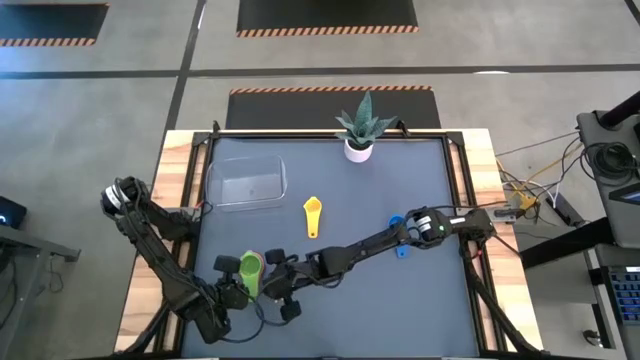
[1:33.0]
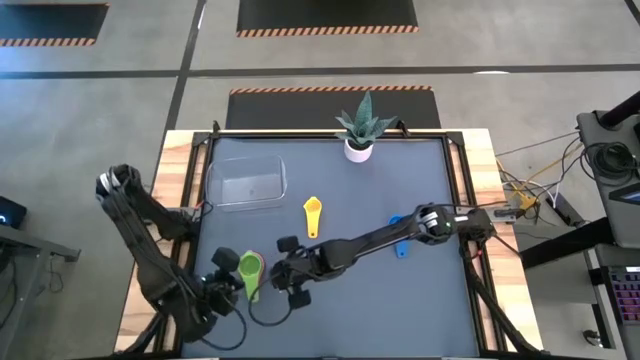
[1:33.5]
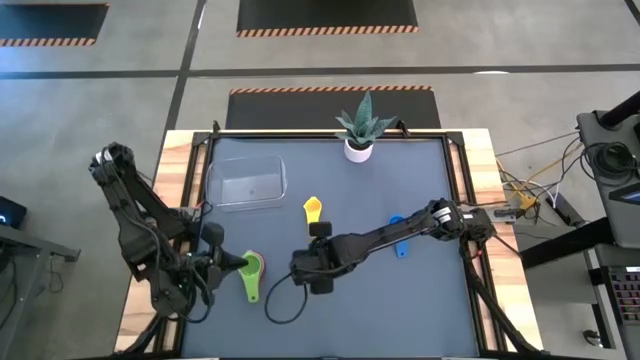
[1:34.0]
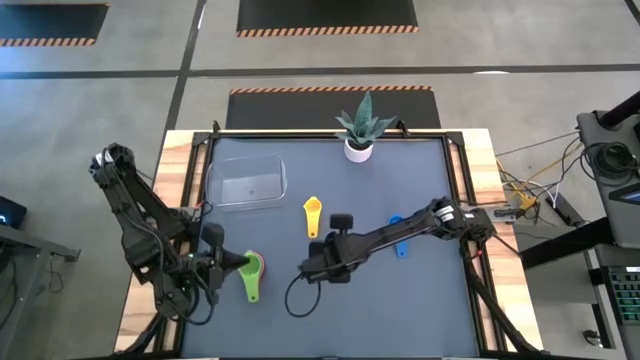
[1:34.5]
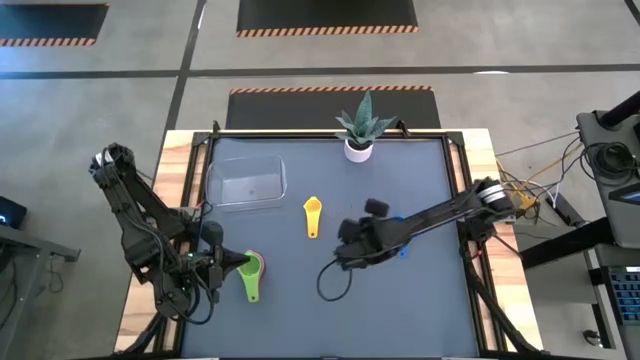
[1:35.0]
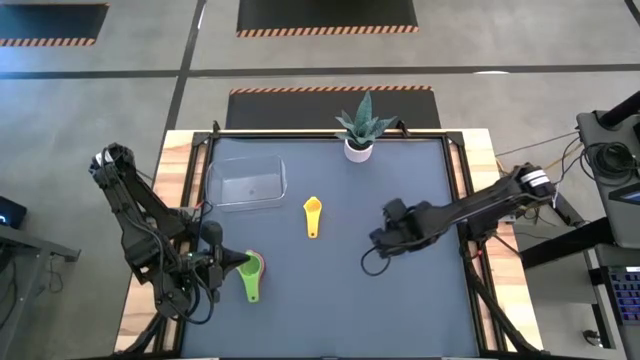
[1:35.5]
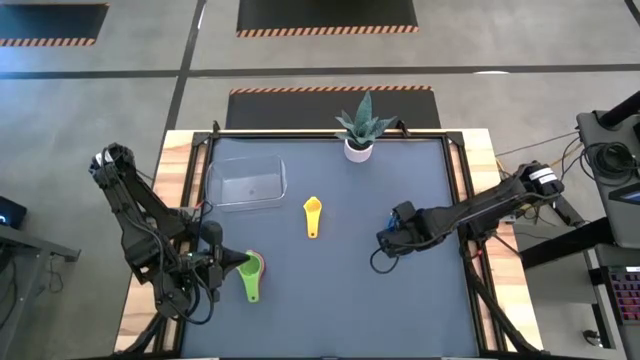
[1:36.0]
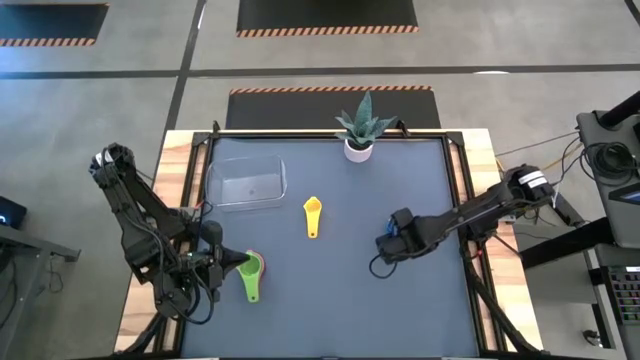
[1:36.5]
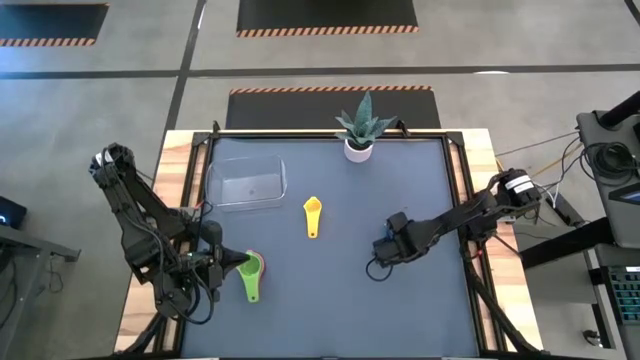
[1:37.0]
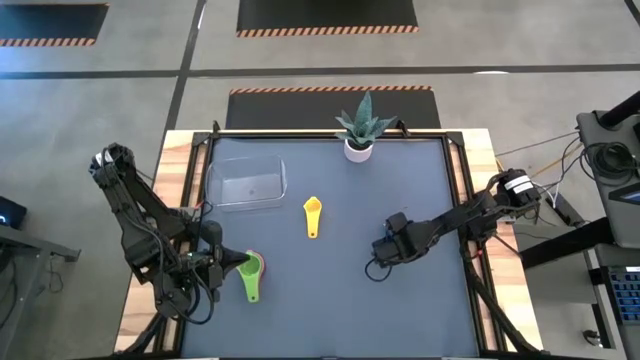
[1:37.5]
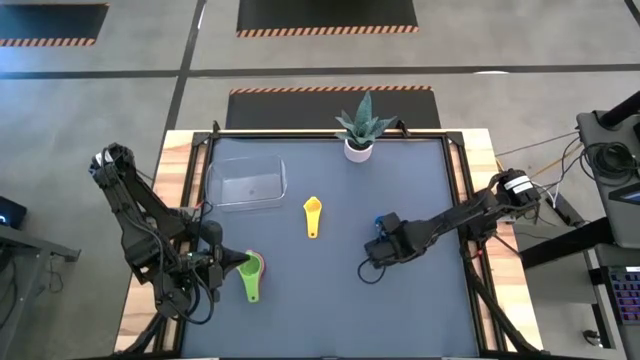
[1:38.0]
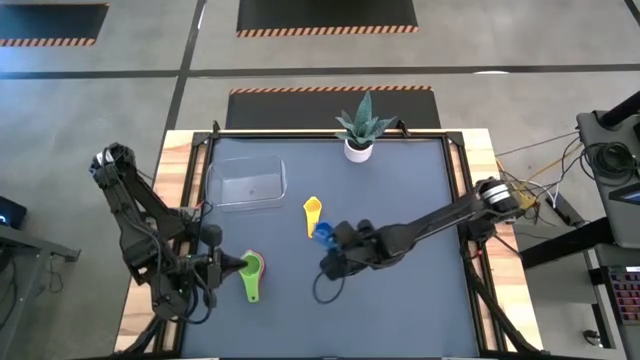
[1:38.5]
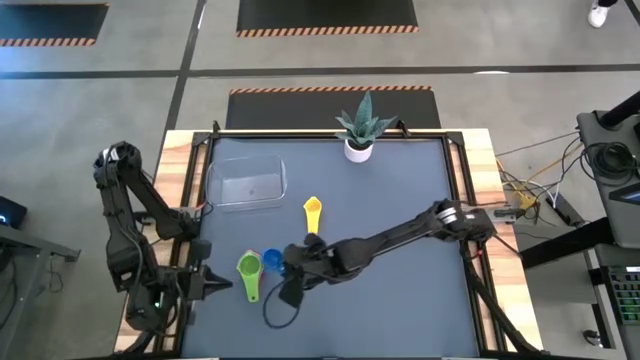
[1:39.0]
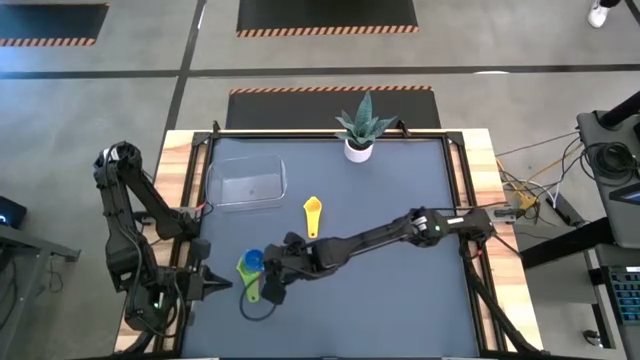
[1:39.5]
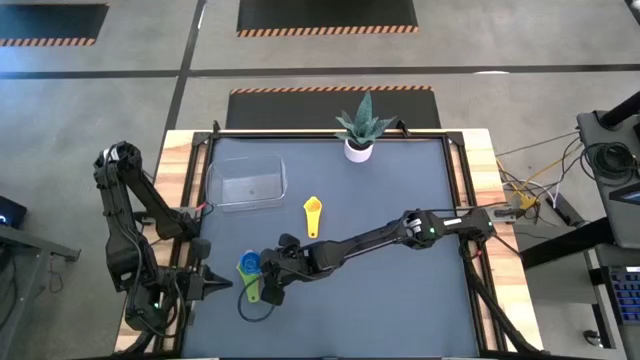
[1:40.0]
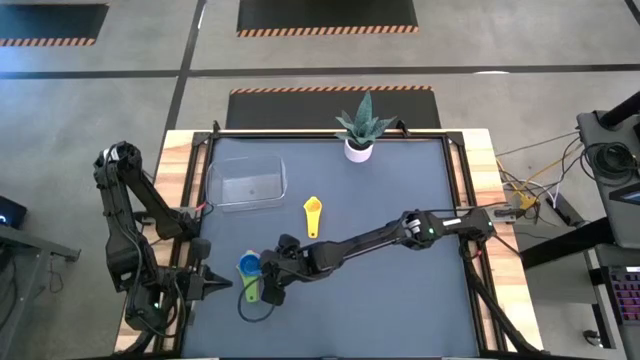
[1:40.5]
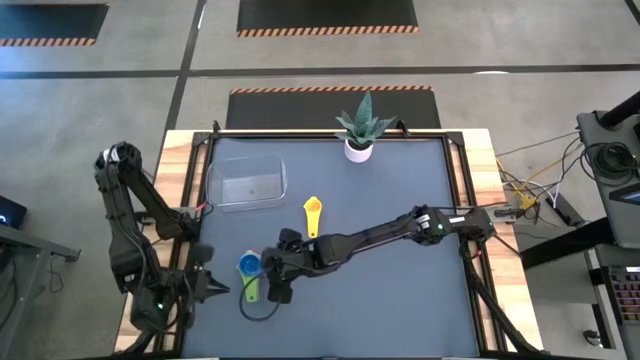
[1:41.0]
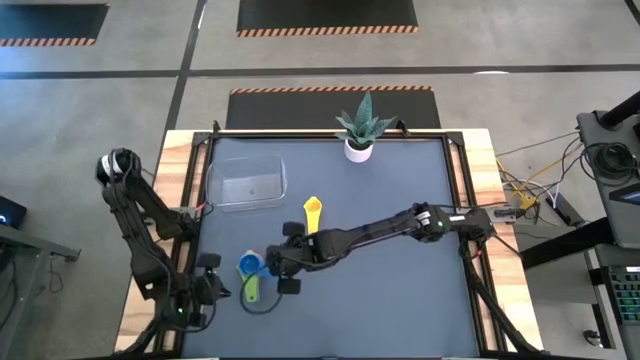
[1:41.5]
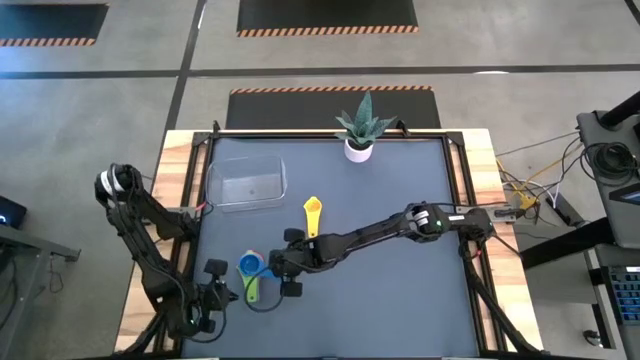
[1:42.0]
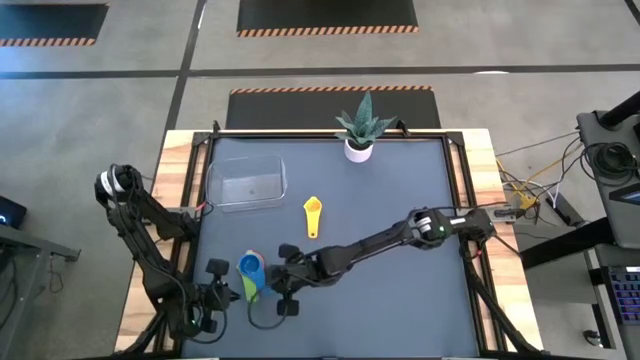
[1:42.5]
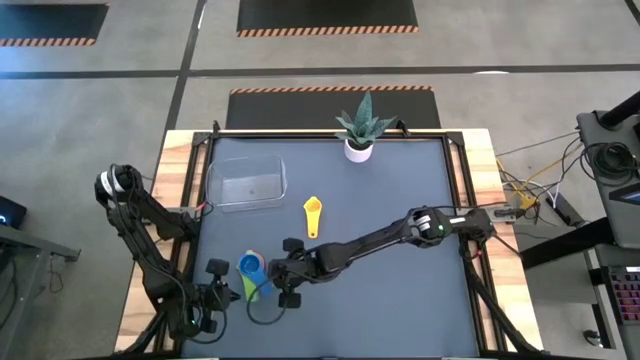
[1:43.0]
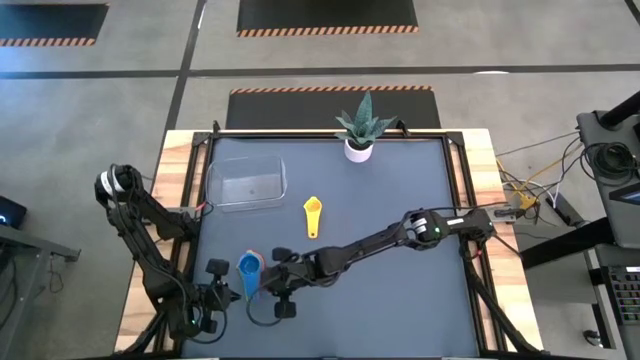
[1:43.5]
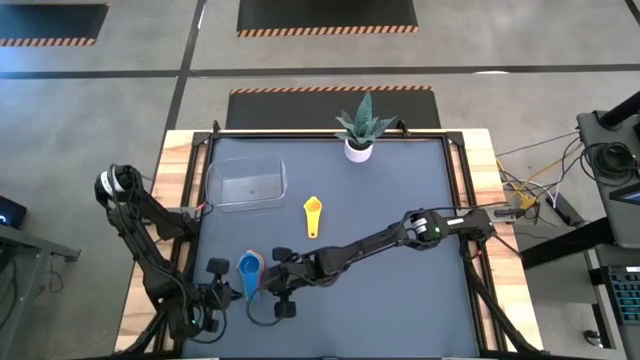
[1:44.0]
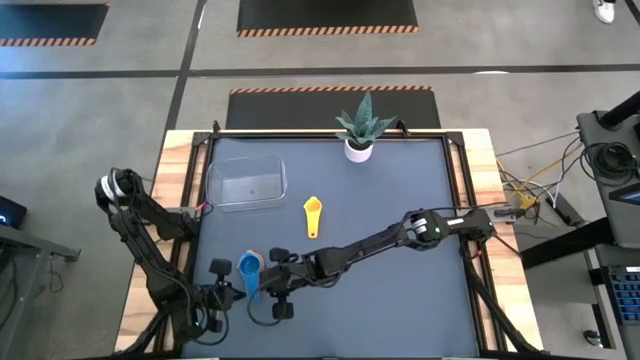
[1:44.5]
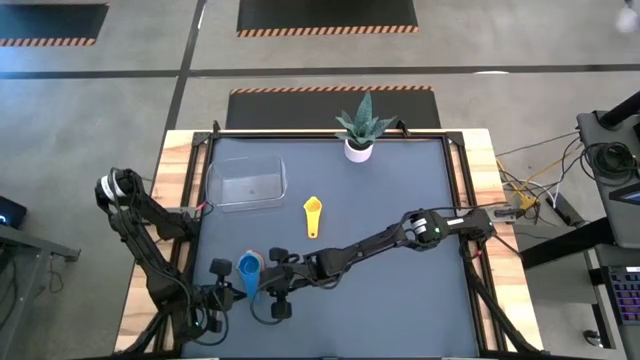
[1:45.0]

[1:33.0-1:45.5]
Task: Nest measuring cups in basket
Stack the blue measuring cup on top of the green measuring cup

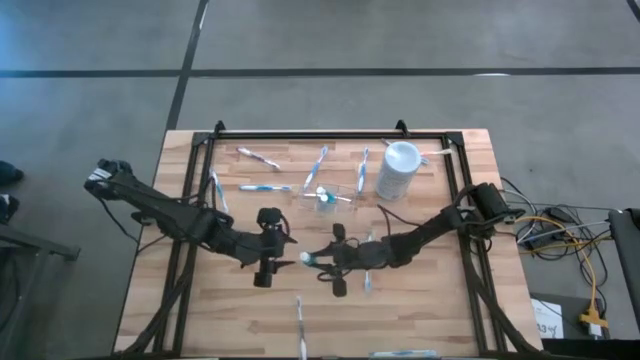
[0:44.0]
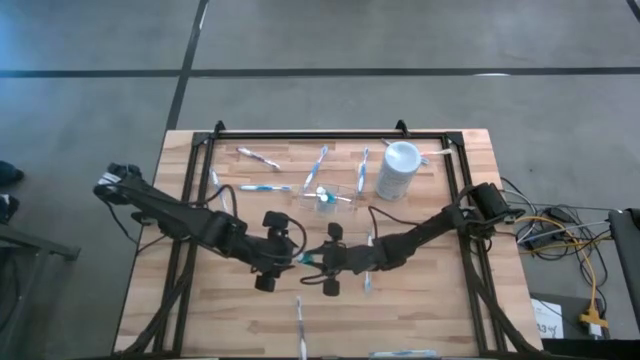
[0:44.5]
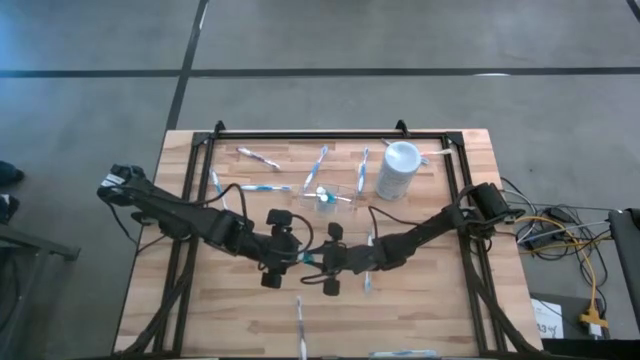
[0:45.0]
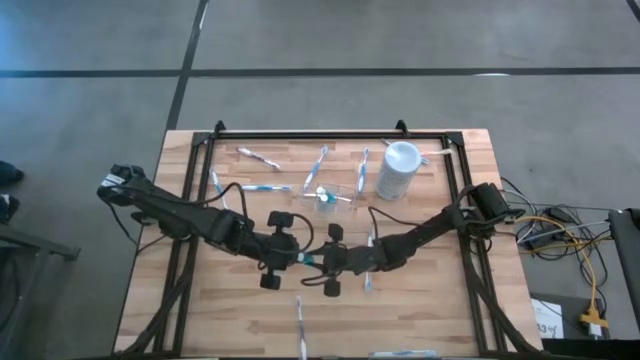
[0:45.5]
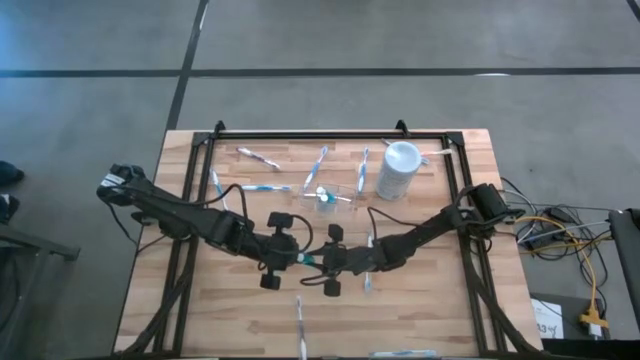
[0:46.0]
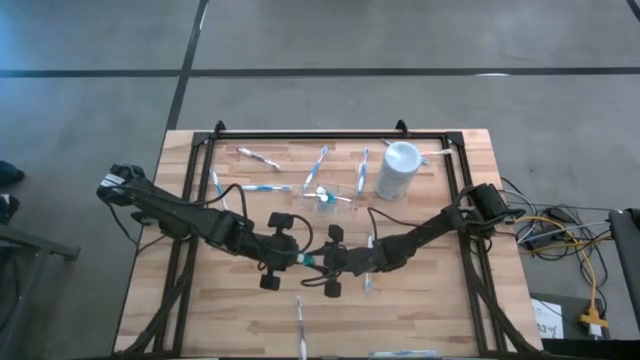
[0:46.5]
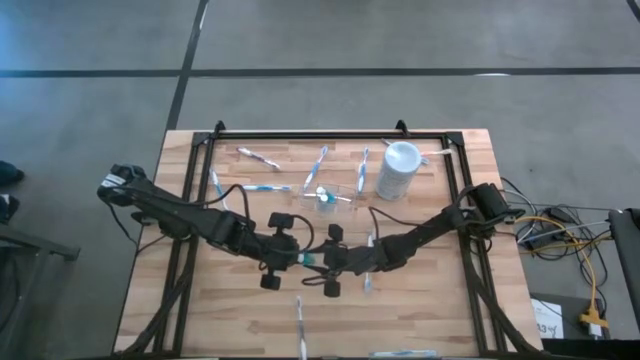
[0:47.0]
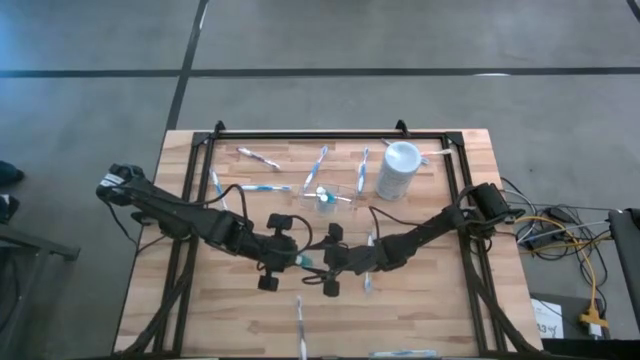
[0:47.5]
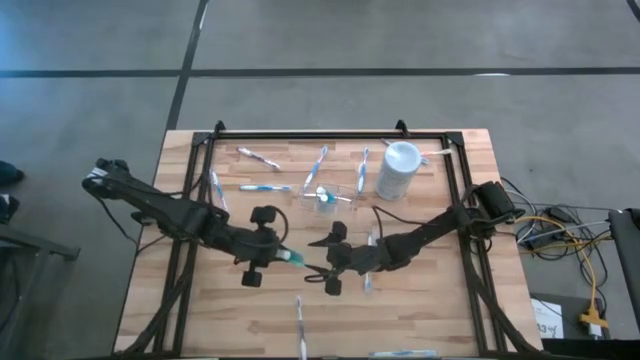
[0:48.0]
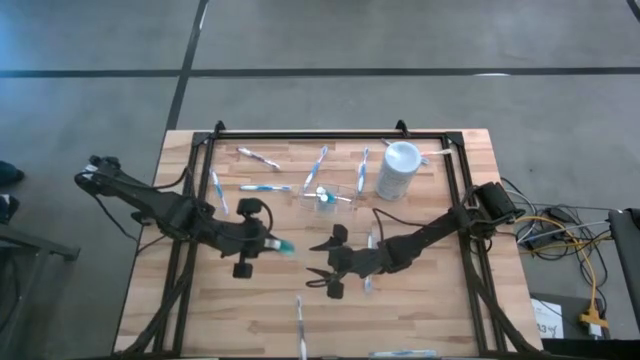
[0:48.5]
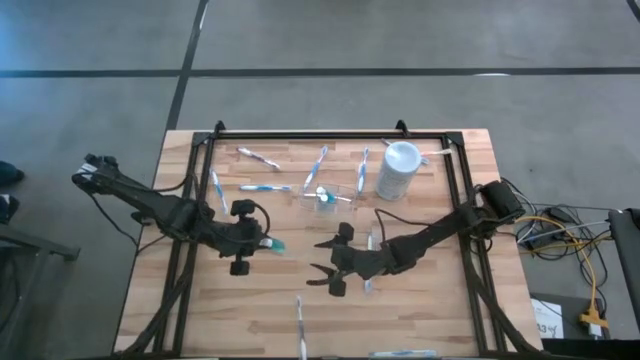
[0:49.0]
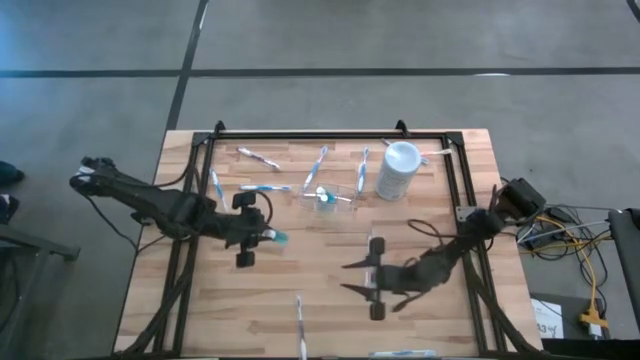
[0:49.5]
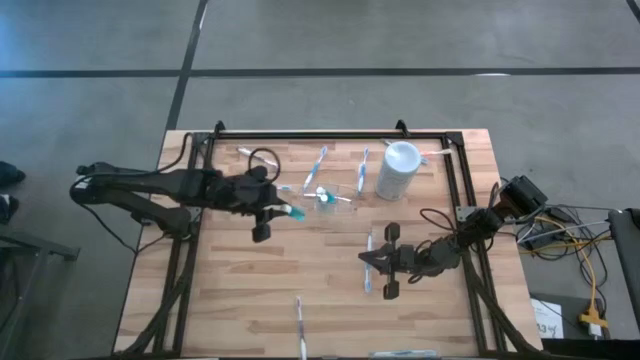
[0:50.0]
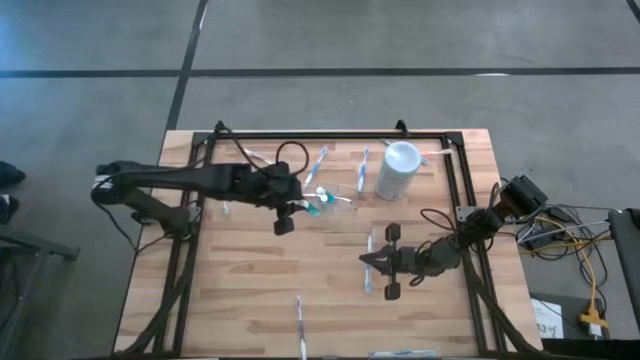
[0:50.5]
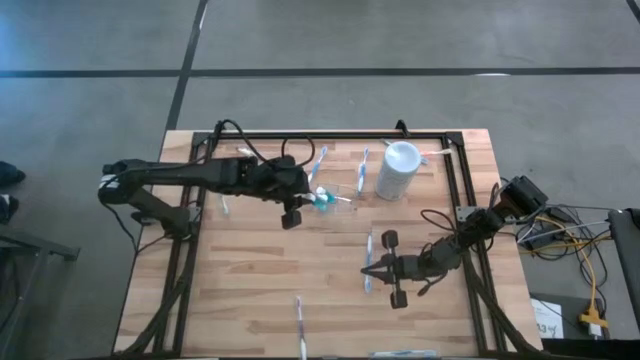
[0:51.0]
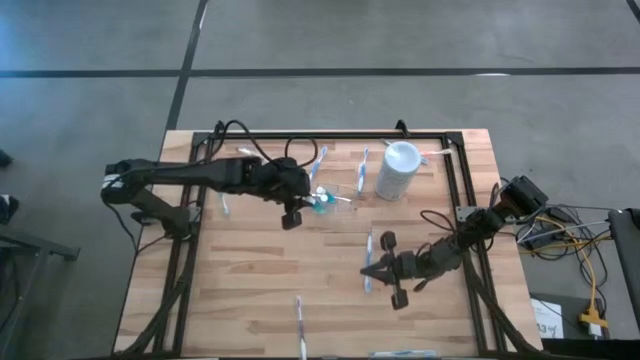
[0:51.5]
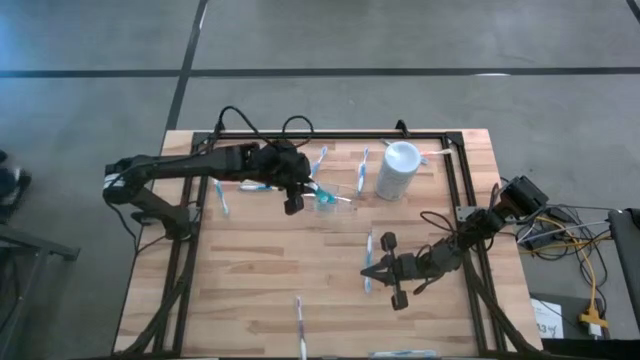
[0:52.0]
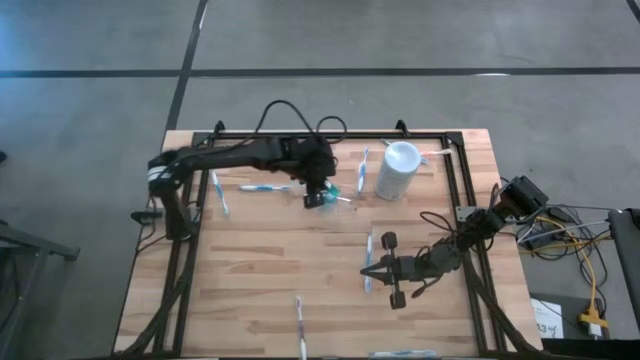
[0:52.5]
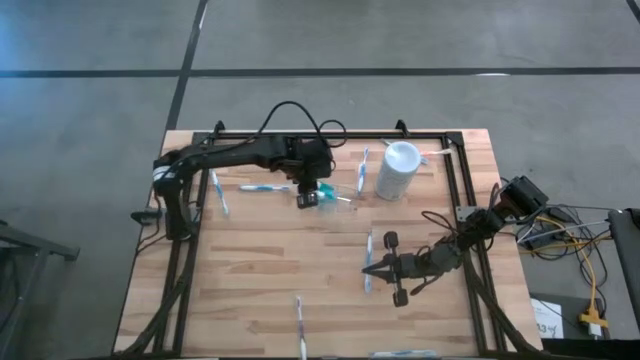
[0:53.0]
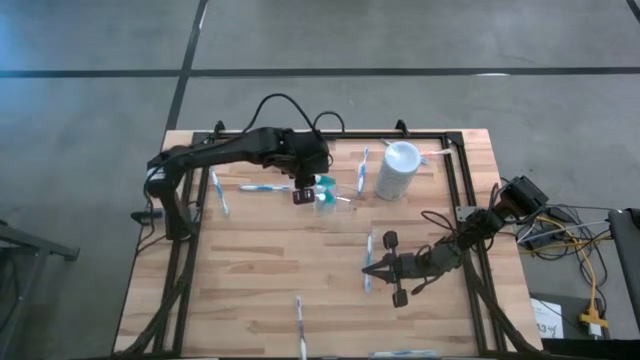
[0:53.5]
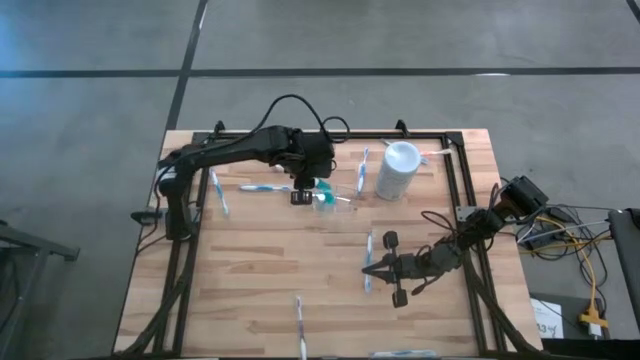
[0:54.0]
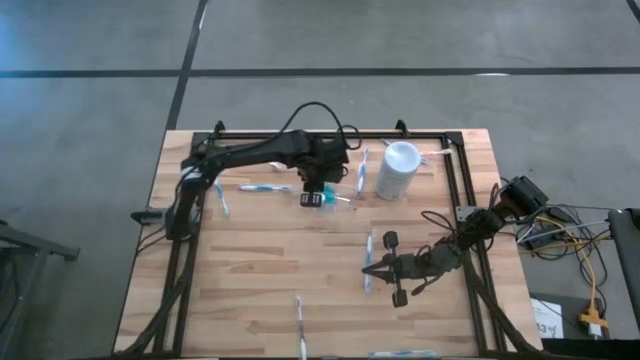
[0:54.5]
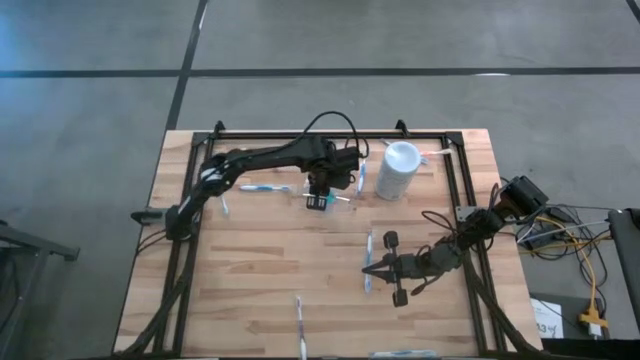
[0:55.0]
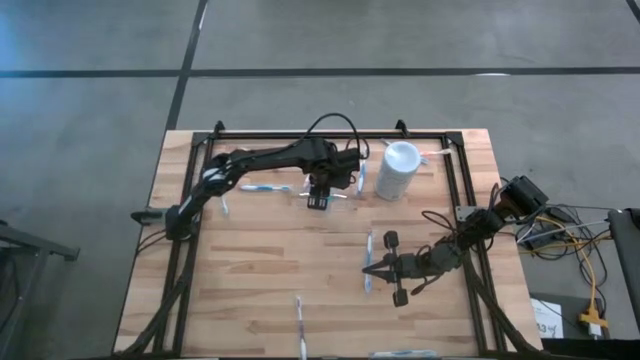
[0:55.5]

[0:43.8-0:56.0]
Task: Pick & Place toothbrushing station
Put the mouthwash into the transparent organizer
